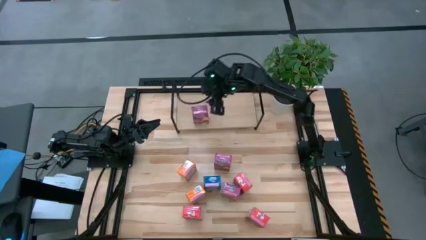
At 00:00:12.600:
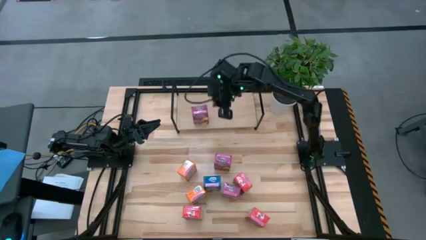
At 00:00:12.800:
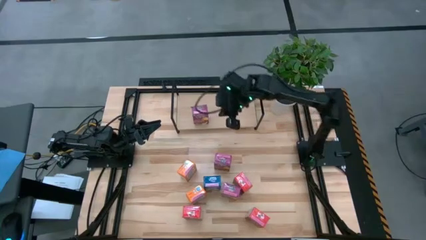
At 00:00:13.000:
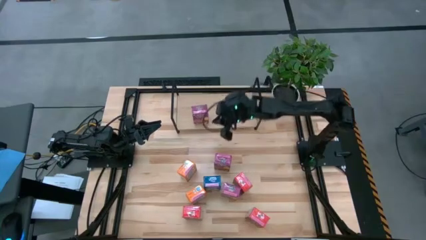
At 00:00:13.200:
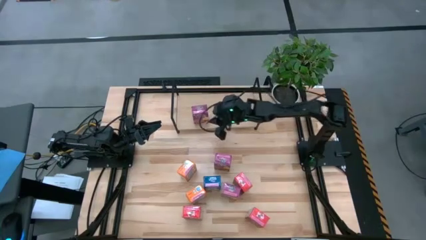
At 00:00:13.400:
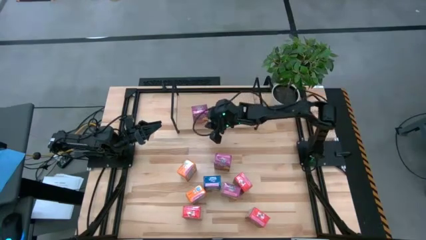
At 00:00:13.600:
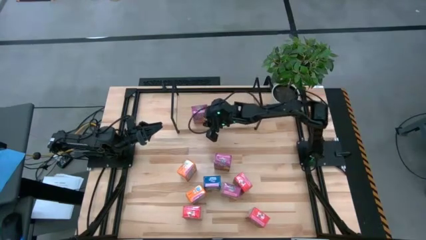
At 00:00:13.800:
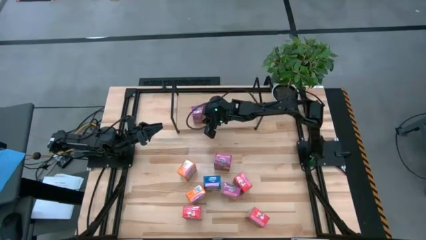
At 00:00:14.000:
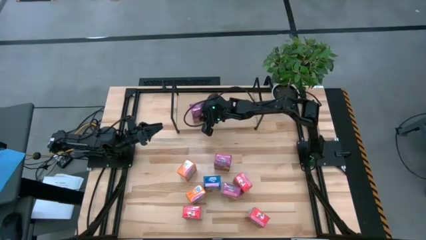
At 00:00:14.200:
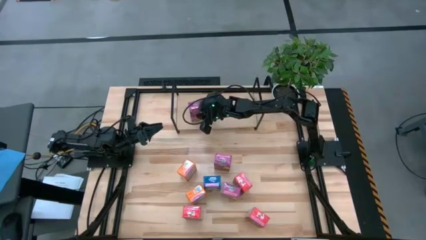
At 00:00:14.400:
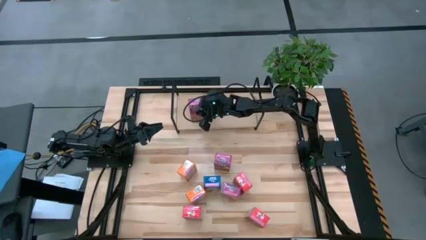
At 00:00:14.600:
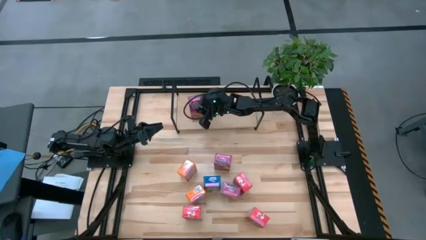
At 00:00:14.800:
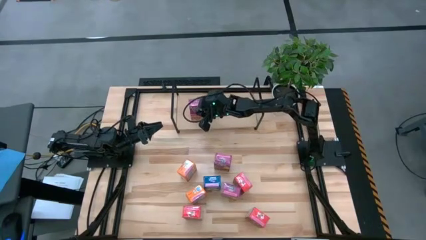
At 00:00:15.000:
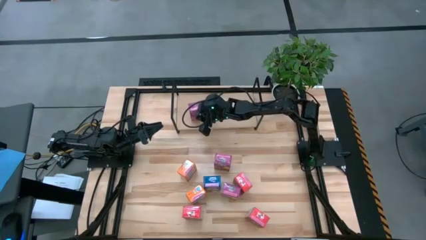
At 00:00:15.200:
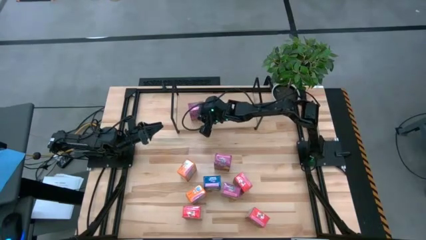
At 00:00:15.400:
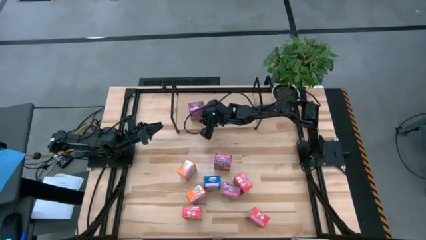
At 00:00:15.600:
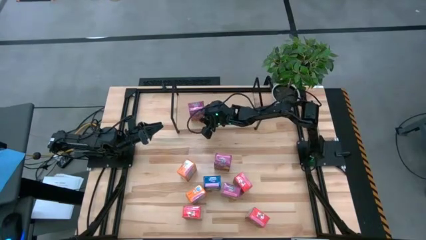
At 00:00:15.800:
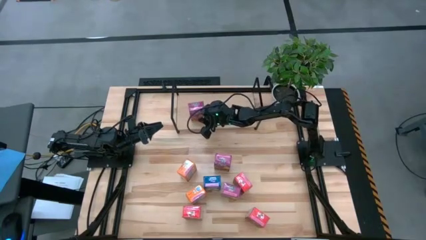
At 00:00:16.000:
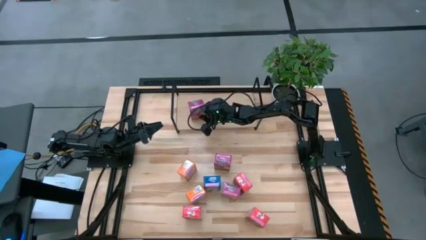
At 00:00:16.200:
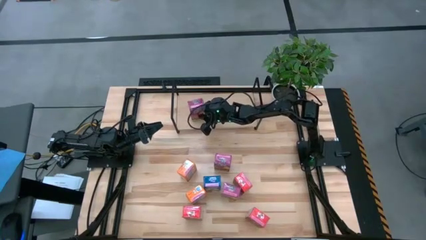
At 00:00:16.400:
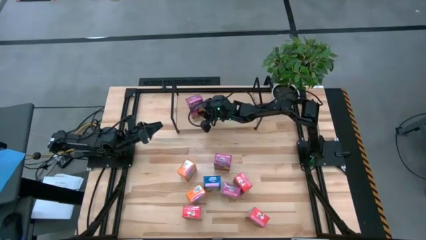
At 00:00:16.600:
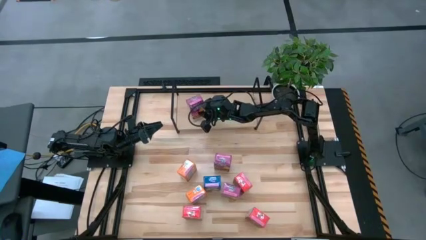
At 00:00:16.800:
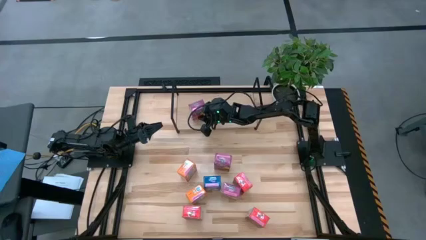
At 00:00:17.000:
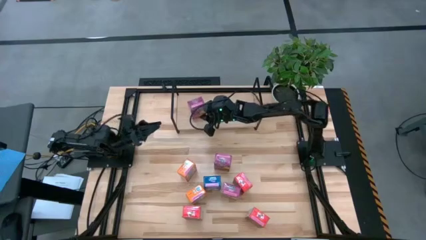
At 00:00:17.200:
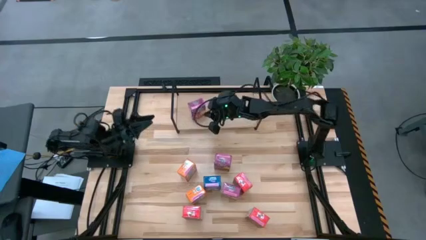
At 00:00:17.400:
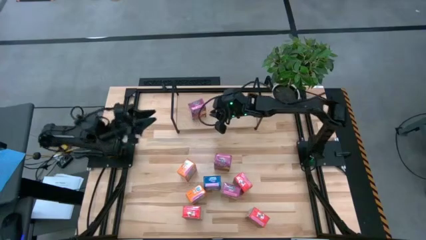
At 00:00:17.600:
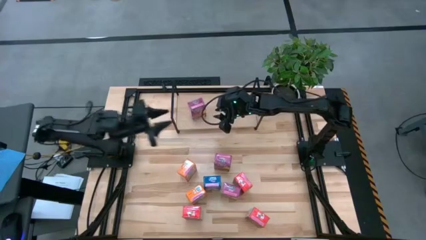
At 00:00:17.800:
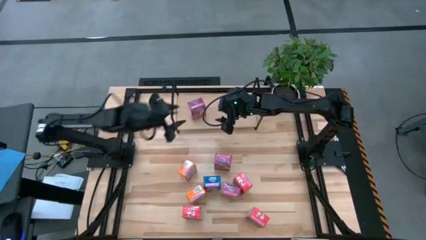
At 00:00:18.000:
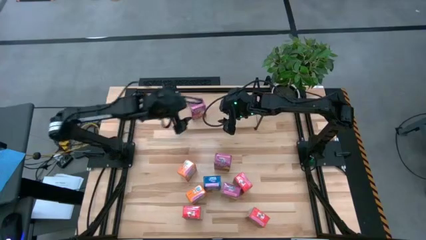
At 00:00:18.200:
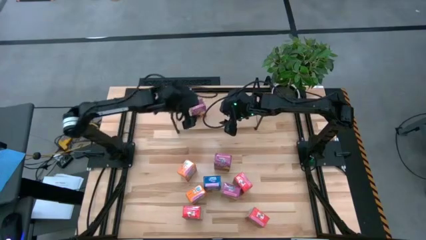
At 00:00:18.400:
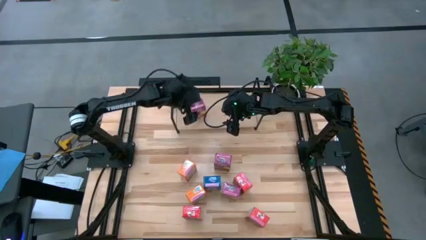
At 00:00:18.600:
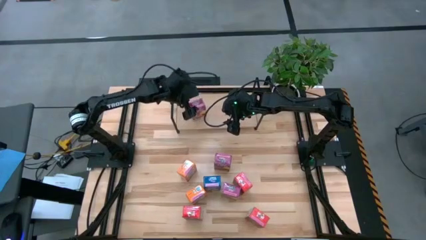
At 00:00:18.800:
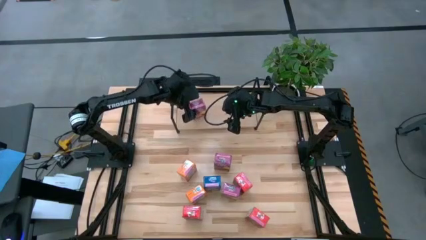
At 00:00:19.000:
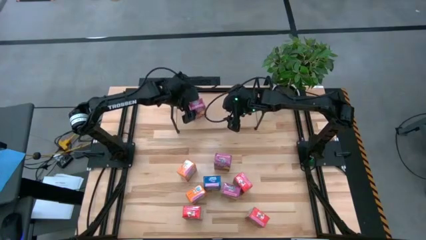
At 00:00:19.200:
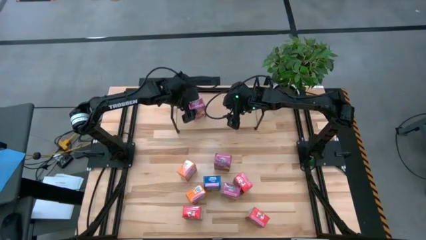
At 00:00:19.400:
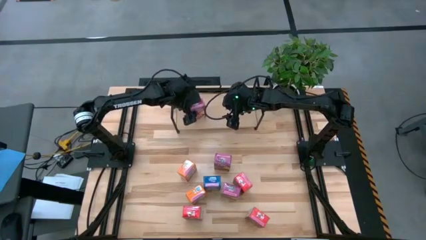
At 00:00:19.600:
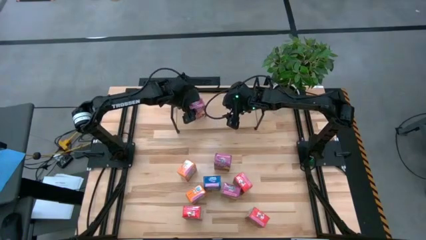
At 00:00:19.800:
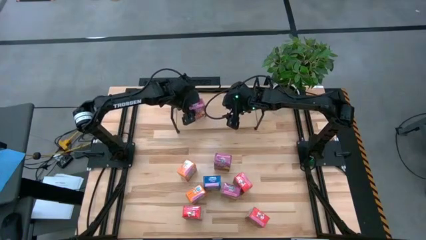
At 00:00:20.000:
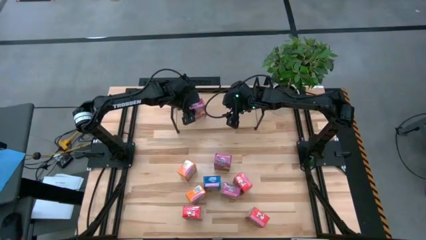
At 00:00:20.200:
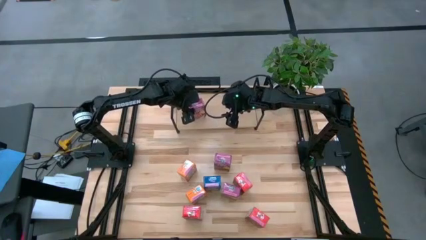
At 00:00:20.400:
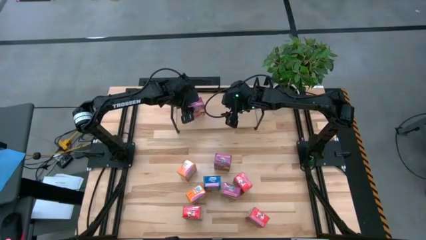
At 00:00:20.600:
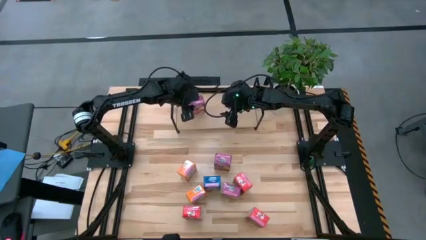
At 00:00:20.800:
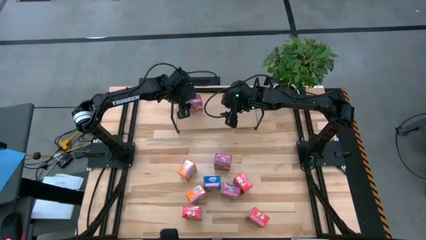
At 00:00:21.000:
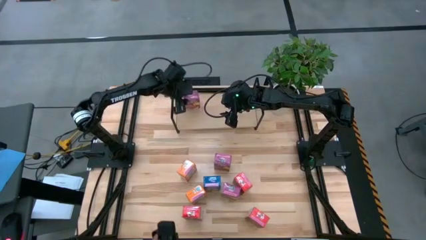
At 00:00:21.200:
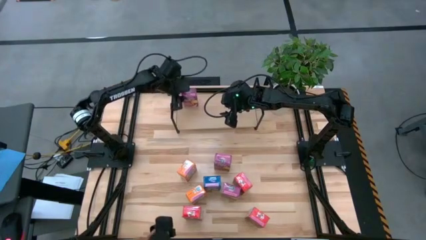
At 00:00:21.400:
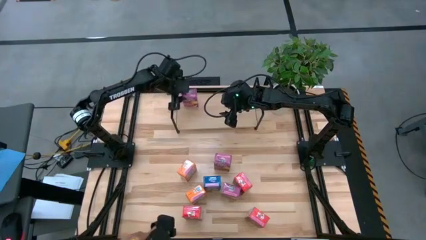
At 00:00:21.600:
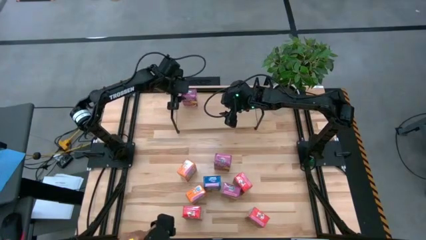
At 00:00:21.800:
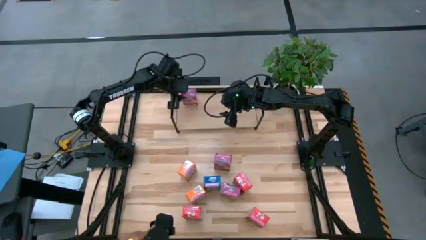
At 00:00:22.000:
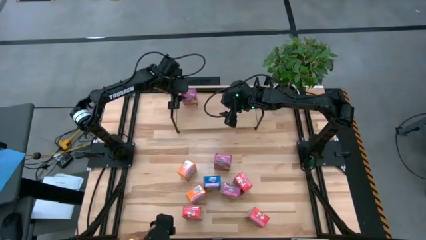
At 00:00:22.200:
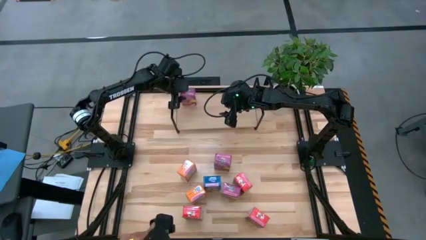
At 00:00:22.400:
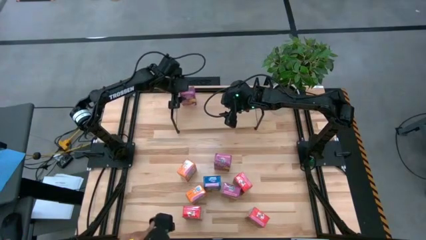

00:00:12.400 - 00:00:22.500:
Task: Stack cereal on shelf
Put the top right purple cereal box on the shelf
